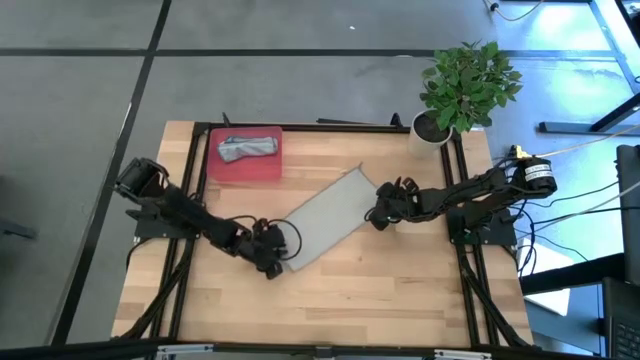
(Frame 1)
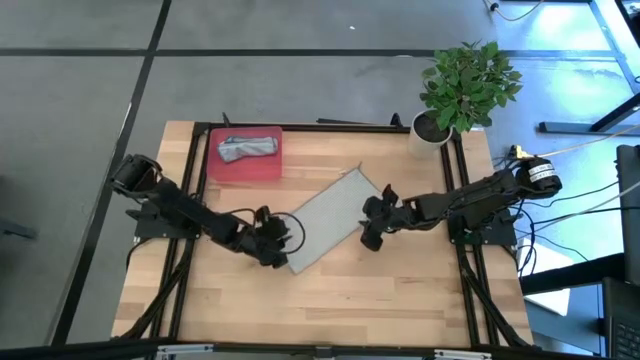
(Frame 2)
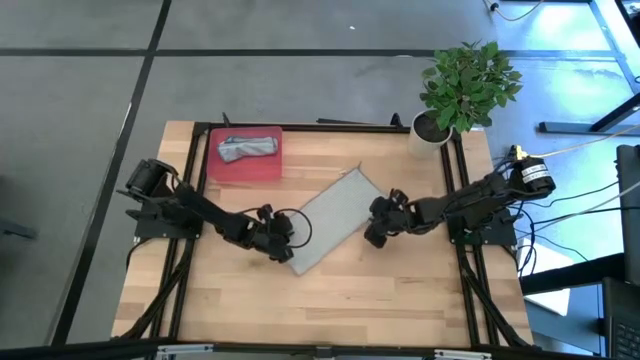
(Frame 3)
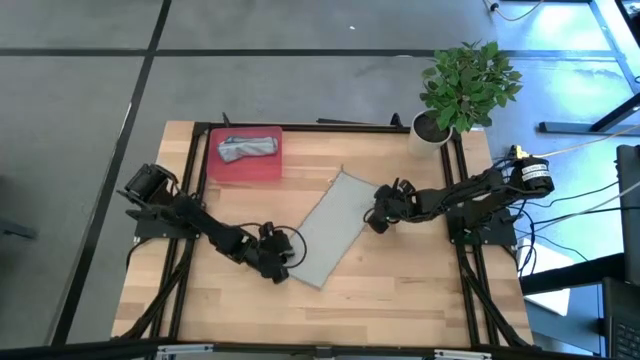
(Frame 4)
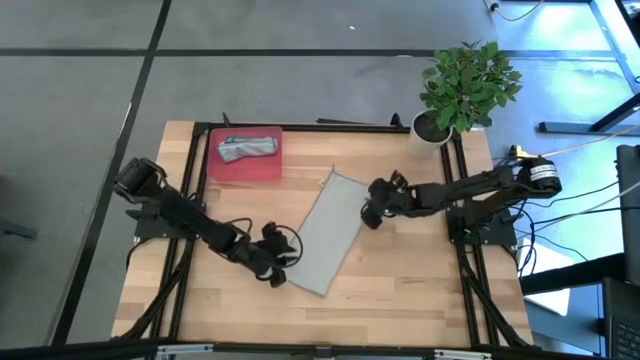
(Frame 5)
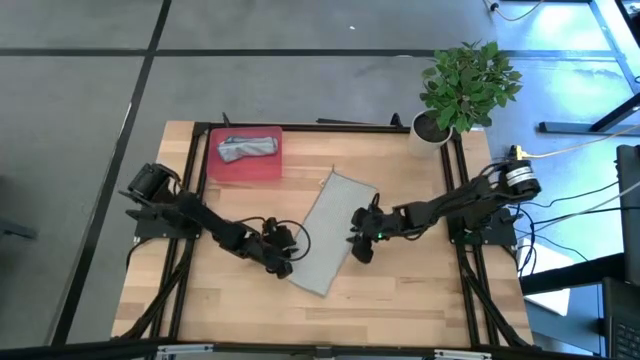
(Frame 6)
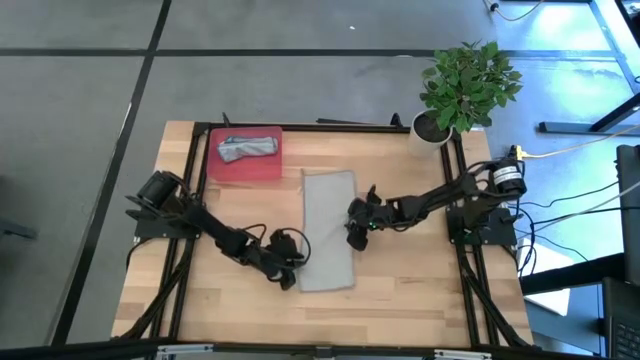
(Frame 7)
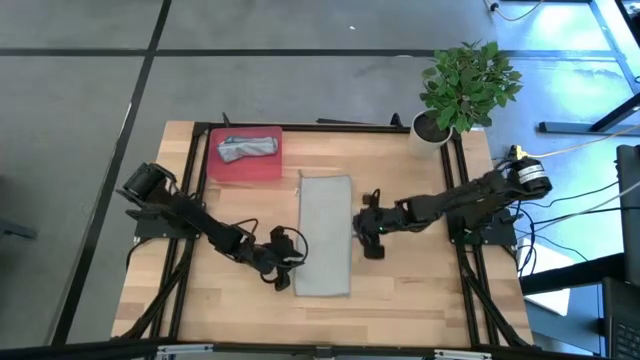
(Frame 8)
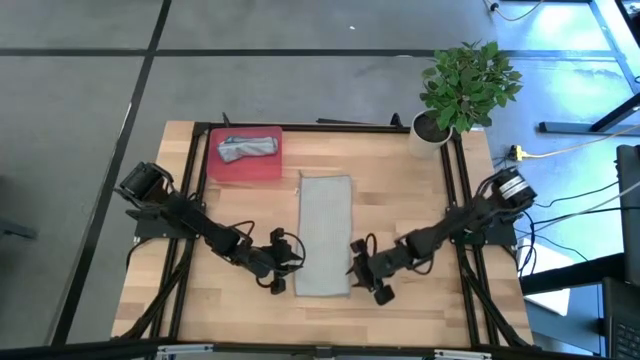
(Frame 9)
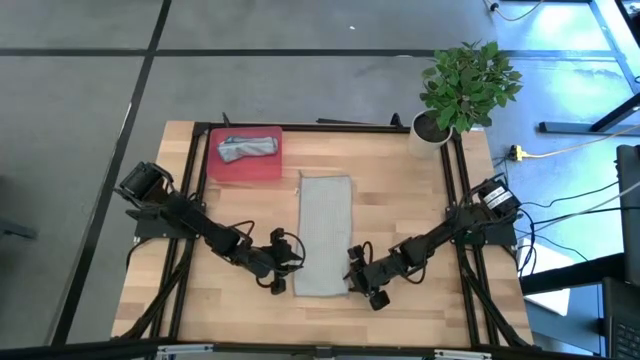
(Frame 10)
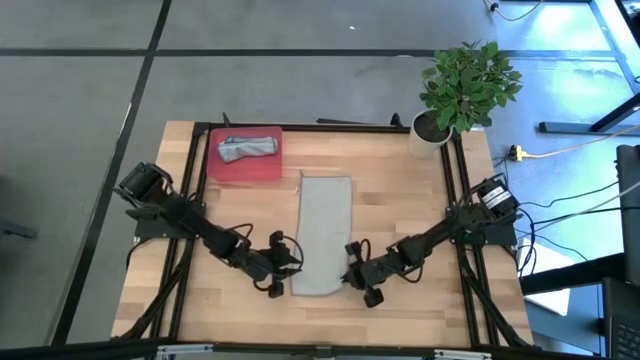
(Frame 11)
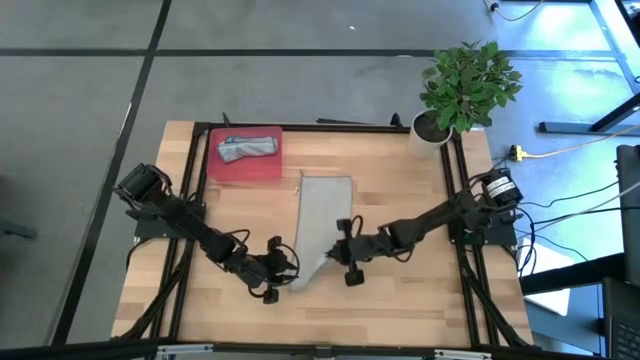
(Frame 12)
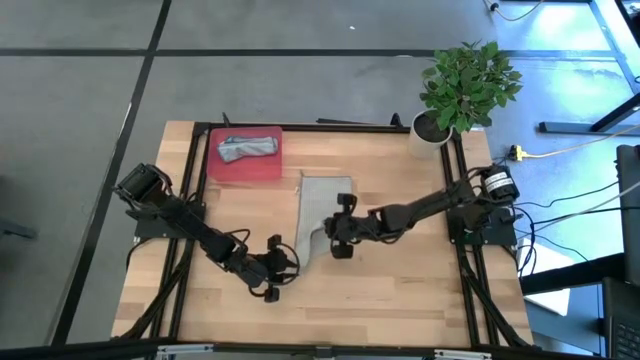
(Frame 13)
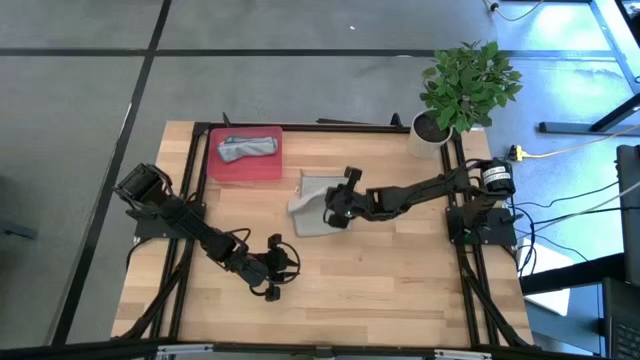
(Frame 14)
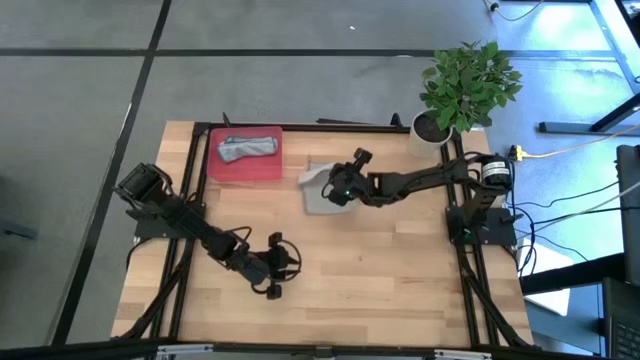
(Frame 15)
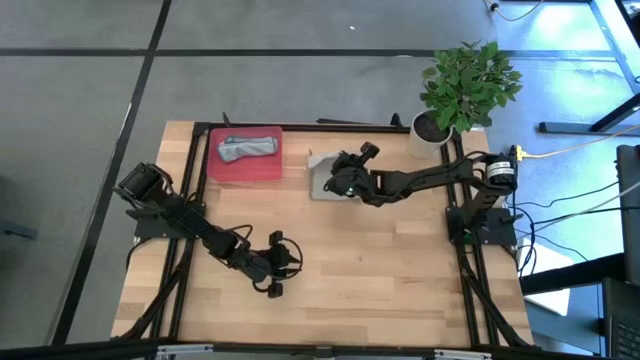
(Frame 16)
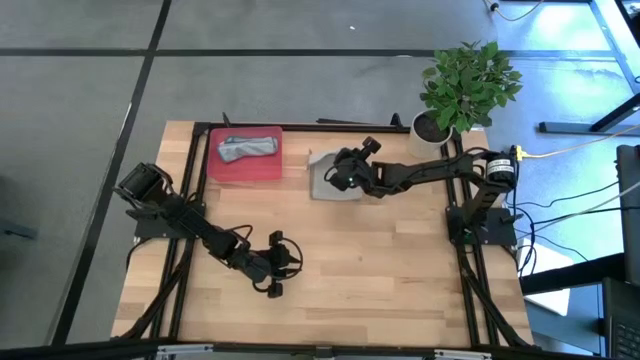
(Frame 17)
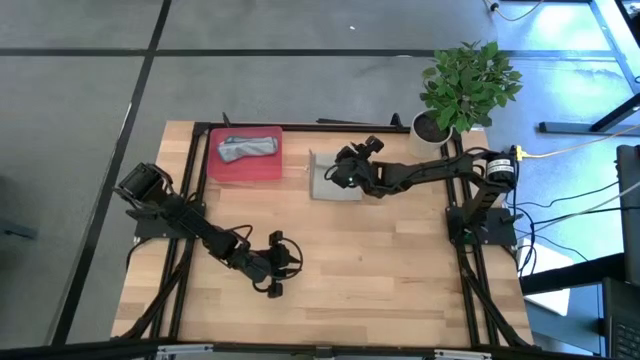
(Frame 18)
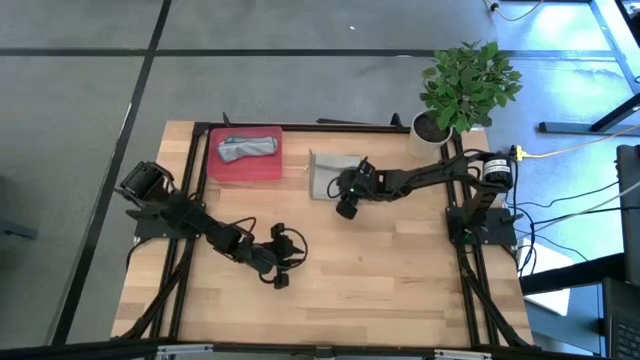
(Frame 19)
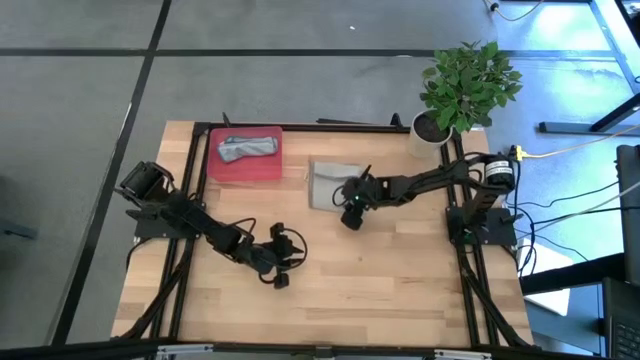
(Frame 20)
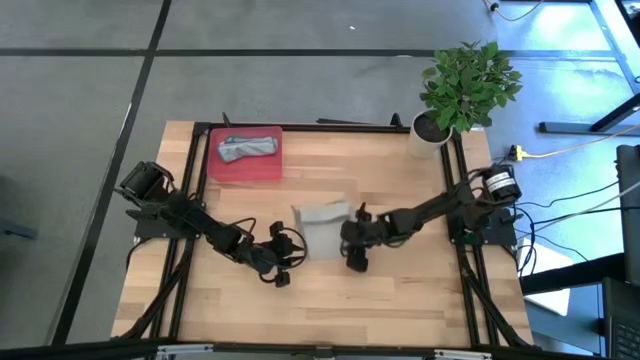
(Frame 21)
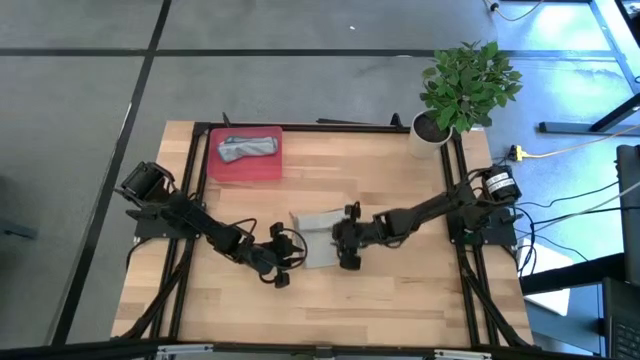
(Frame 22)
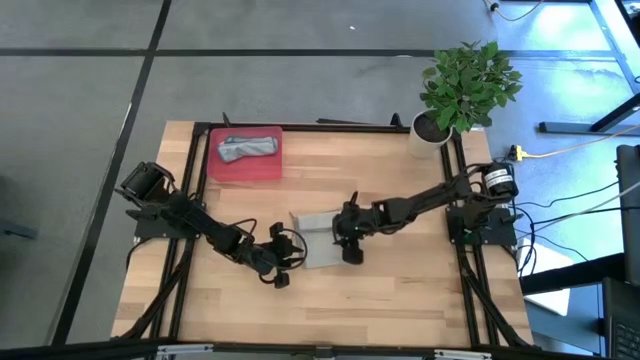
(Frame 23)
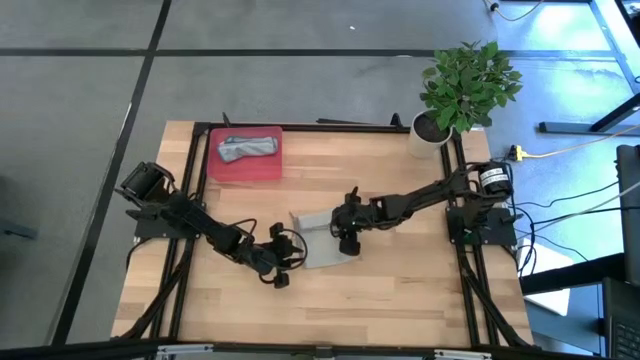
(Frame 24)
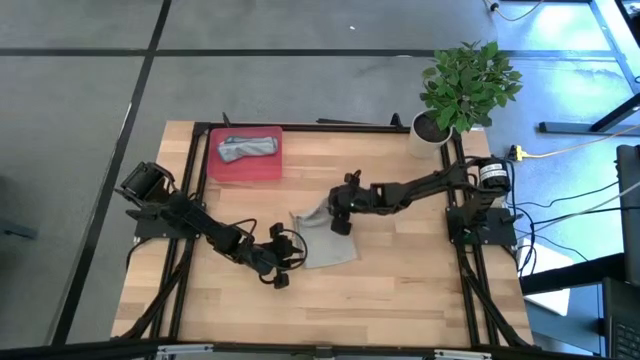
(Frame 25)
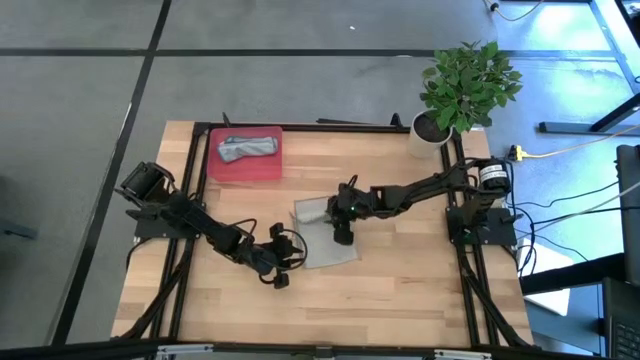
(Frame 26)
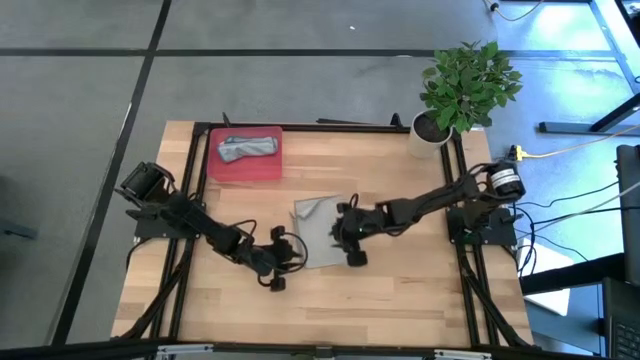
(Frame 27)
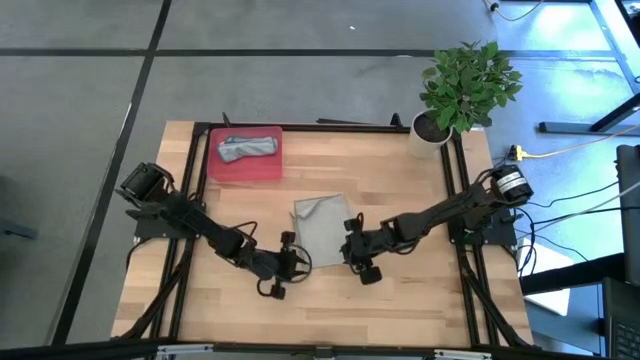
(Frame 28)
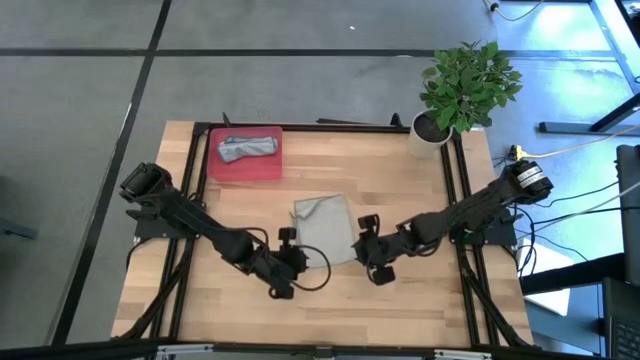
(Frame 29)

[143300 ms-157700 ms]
Task: Roll microfiber towels into tight, uniform cylinder then place into a basket
Fold the gray towel

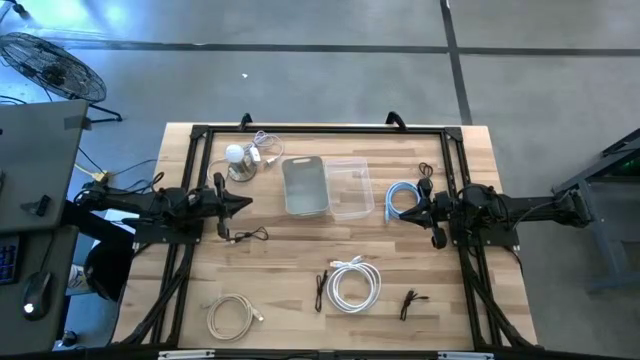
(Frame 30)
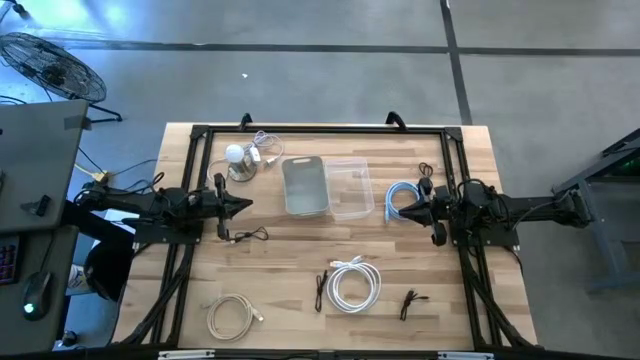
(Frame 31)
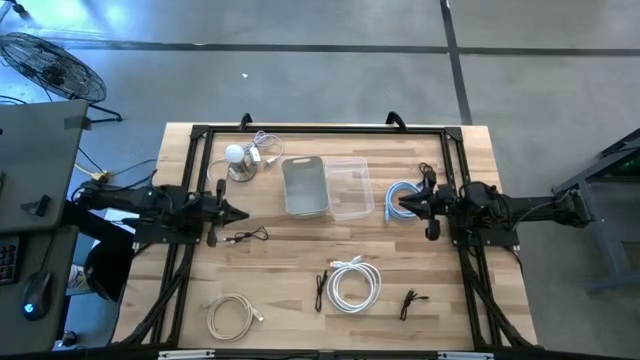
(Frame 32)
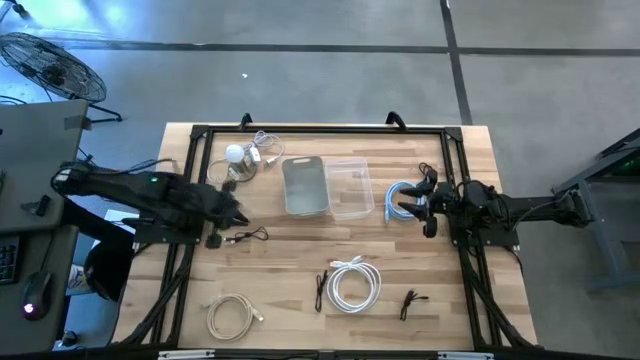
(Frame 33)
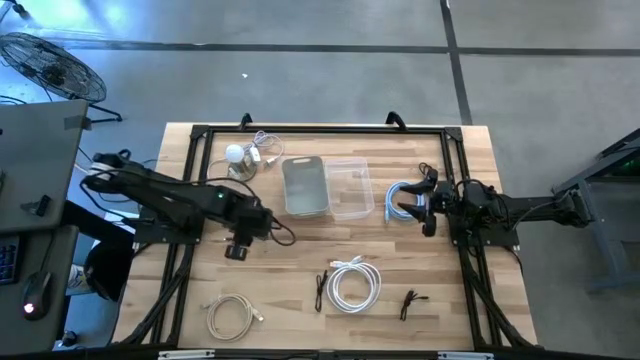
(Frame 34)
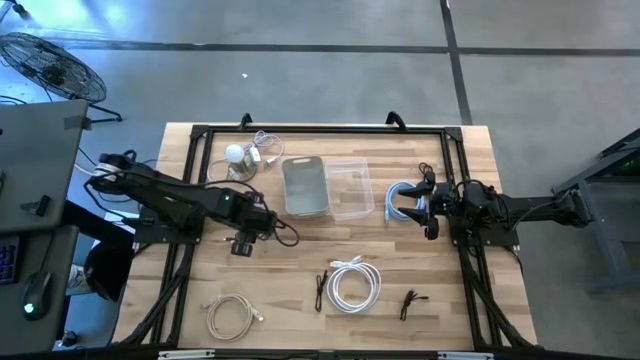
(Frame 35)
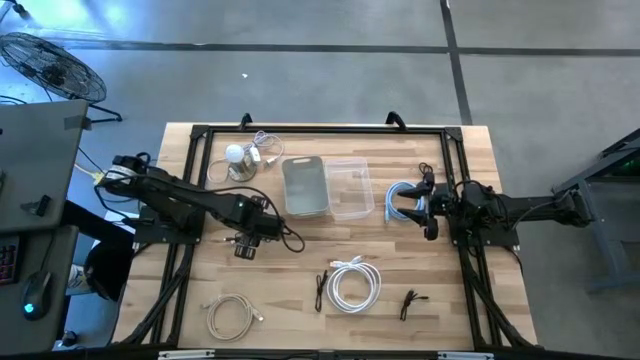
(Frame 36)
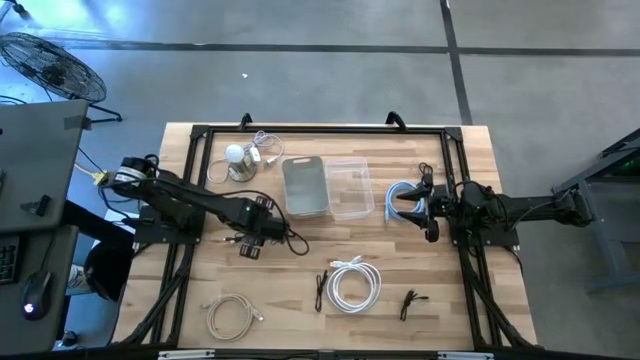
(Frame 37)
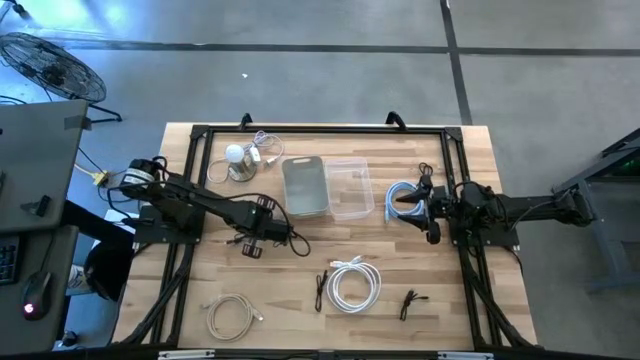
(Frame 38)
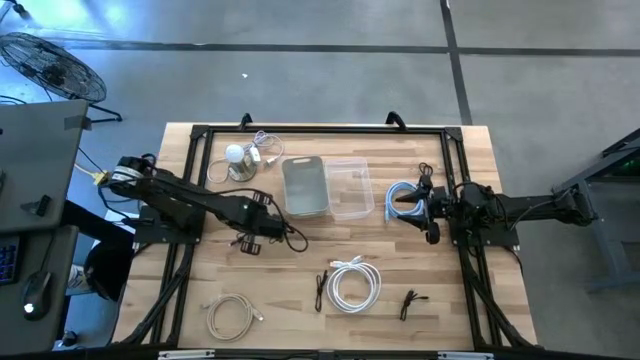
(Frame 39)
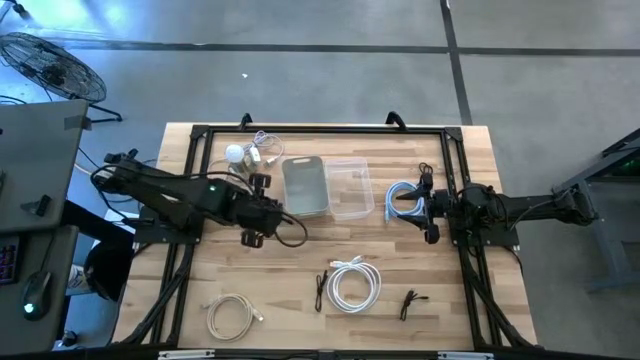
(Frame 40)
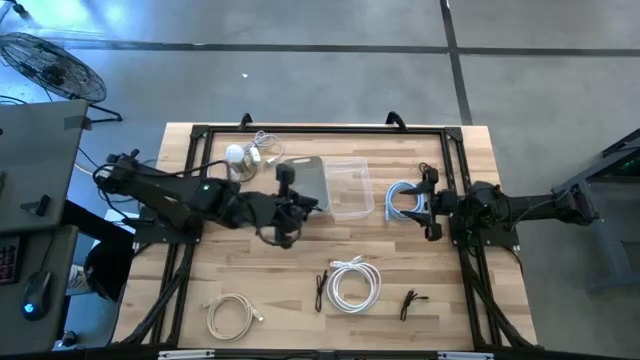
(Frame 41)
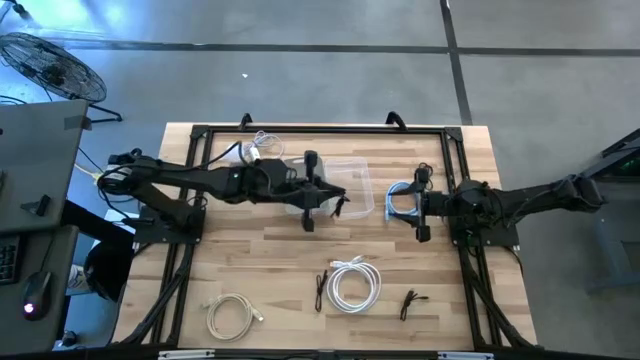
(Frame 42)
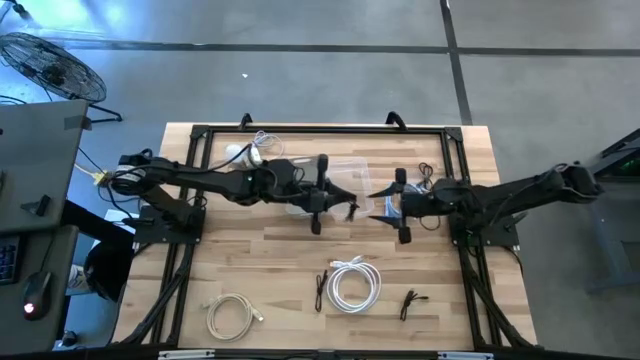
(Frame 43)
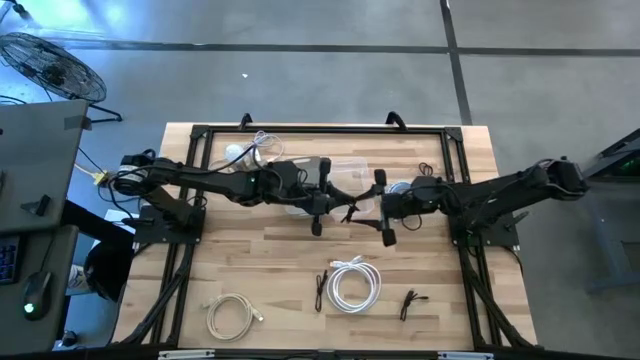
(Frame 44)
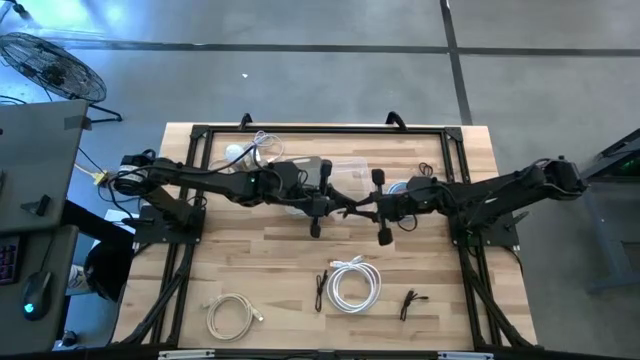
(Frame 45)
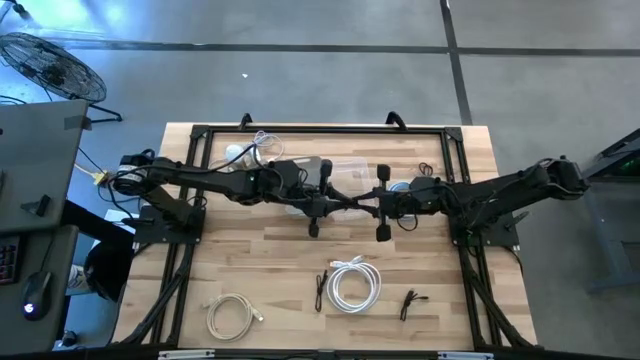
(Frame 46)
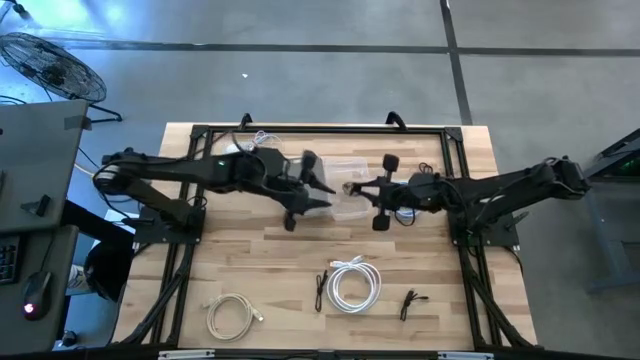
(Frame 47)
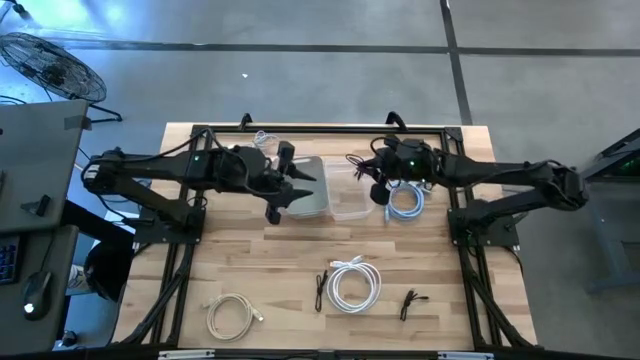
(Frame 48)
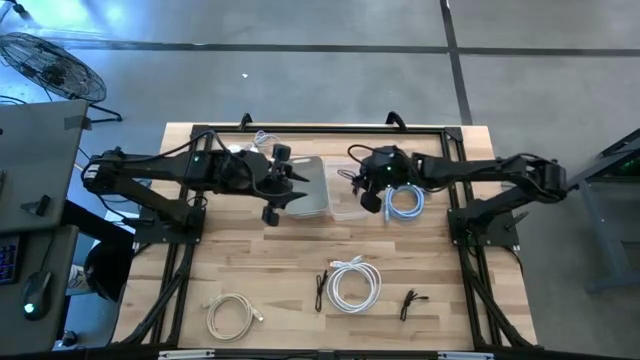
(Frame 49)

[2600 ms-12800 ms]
Task: Pick & Place USB Port
Put the black charger cable into the transparent bin
